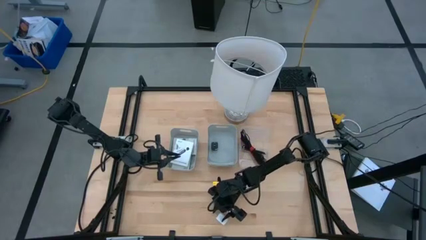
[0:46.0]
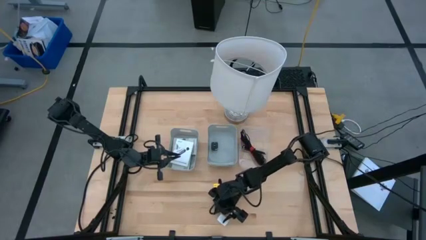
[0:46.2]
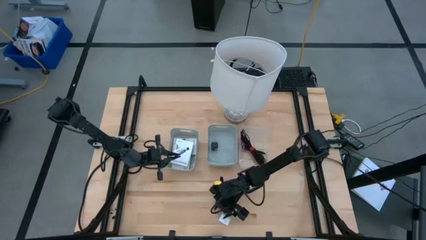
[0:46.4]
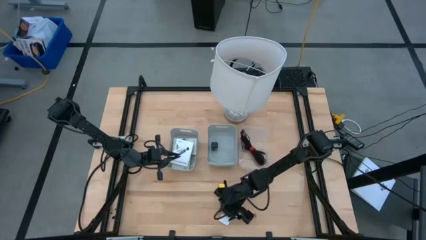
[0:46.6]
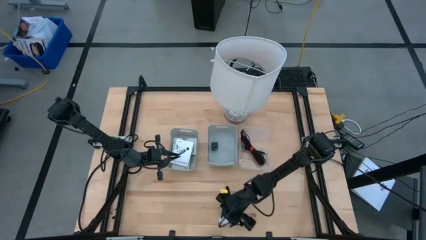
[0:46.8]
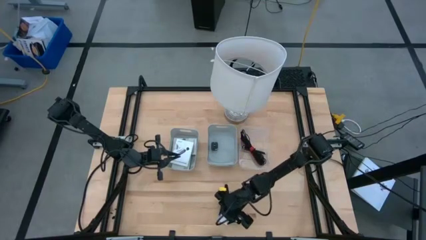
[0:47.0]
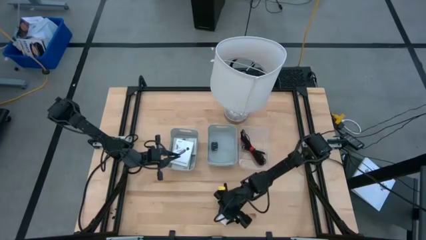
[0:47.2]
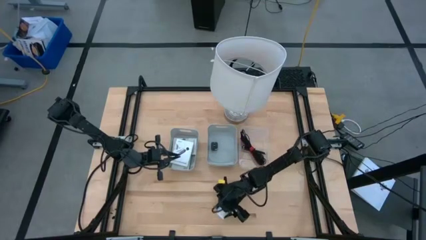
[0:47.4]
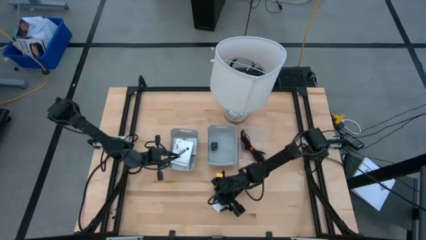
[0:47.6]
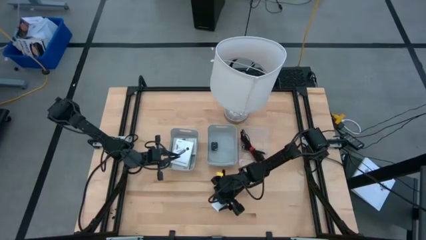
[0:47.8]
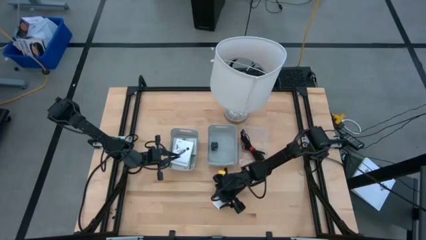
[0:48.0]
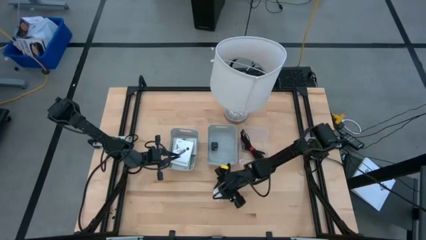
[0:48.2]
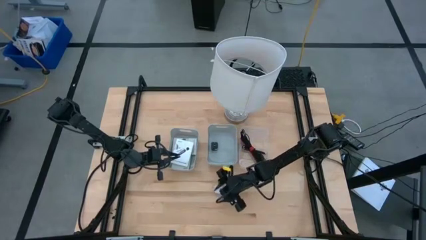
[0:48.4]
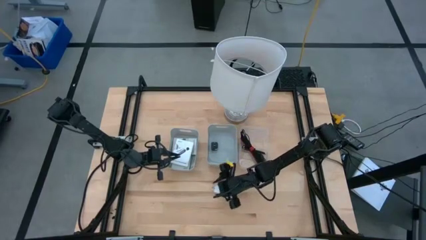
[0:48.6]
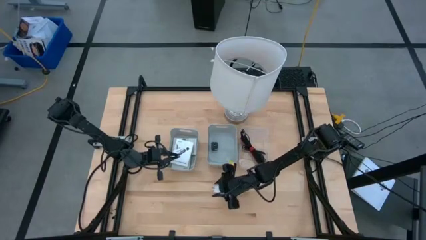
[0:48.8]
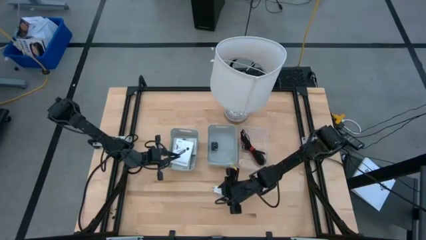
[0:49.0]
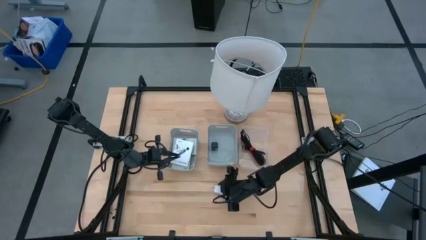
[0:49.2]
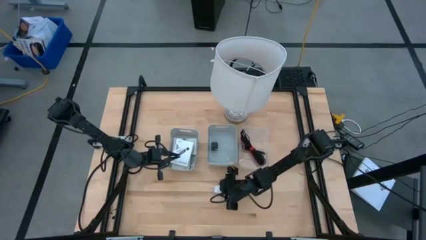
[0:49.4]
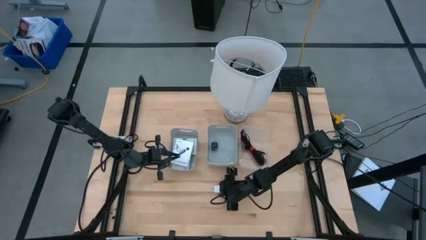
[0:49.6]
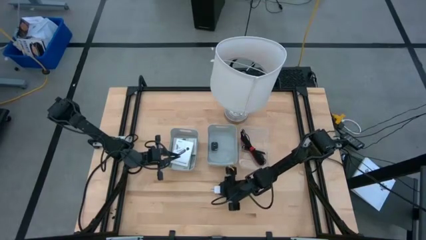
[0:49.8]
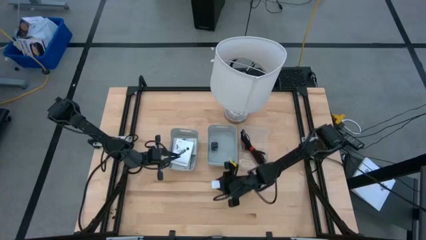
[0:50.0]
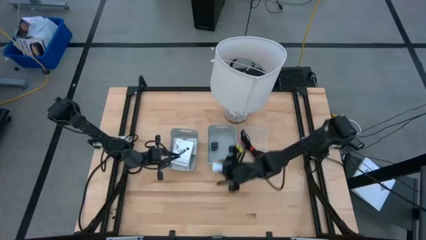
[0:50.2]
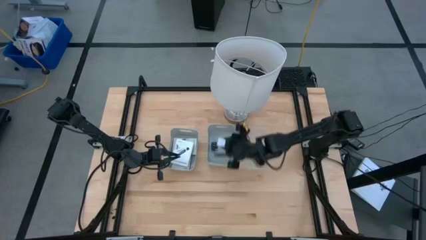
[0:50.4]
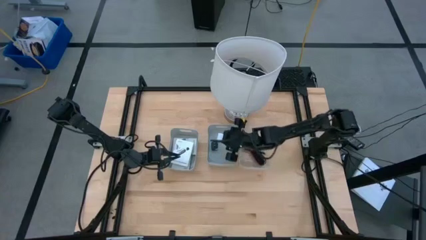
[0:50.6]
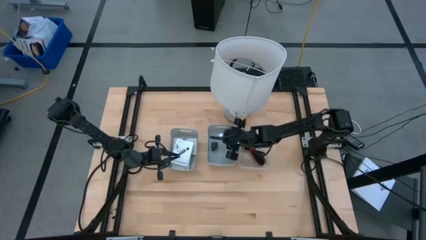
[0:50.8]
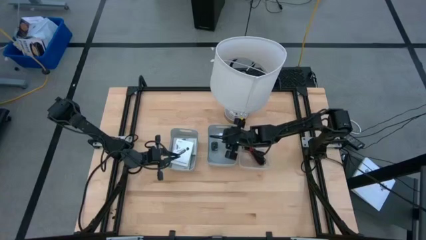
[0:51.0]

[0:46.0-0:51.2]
Task: Pick and place items into bin
Put the white charger adapter into the right gray bin

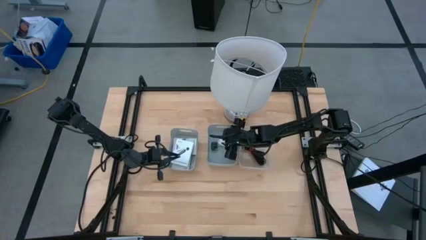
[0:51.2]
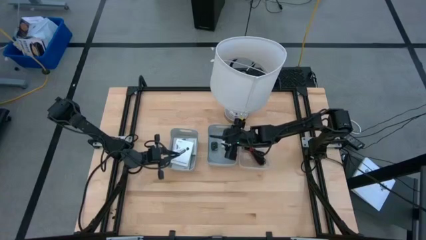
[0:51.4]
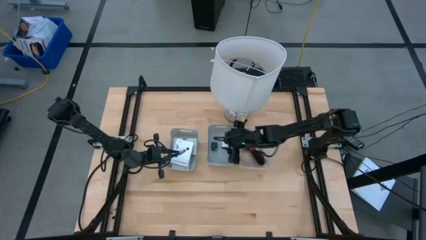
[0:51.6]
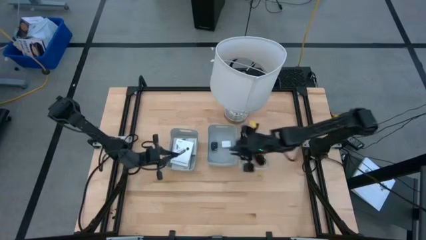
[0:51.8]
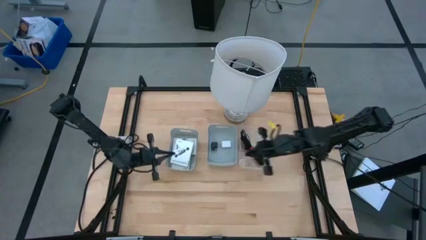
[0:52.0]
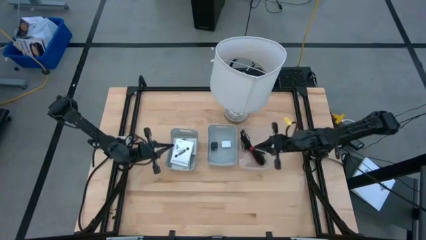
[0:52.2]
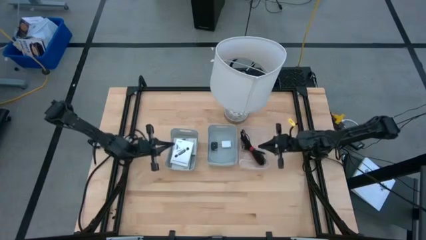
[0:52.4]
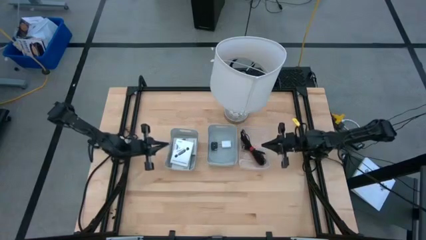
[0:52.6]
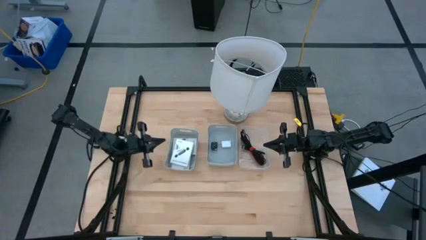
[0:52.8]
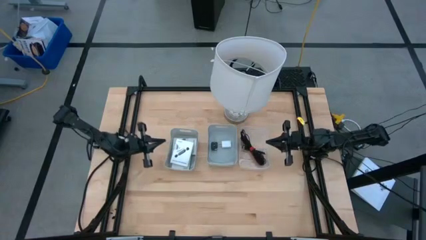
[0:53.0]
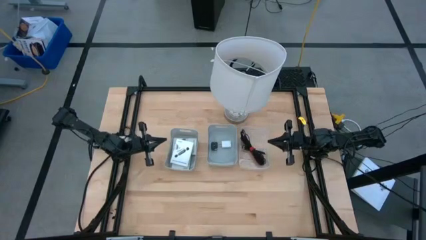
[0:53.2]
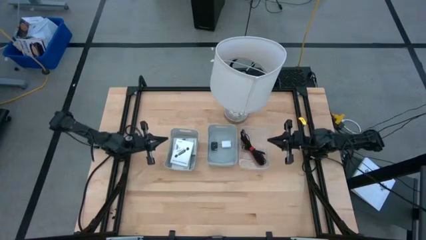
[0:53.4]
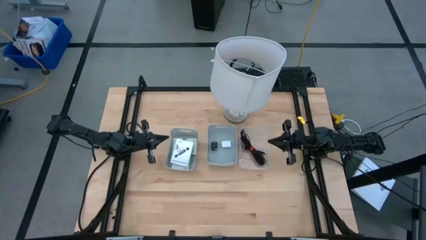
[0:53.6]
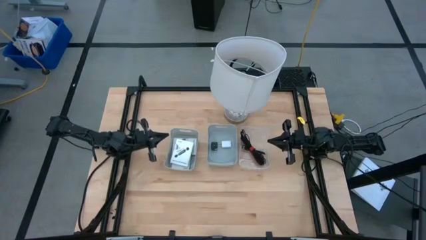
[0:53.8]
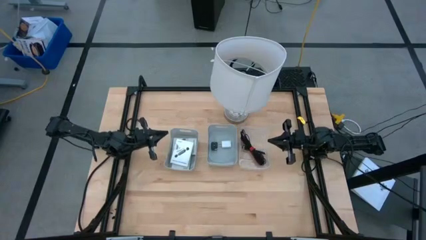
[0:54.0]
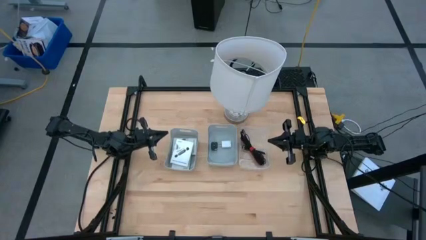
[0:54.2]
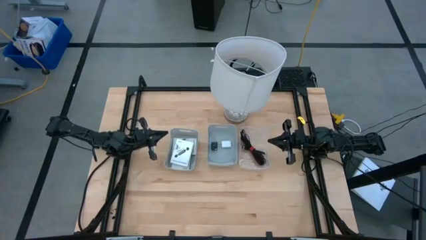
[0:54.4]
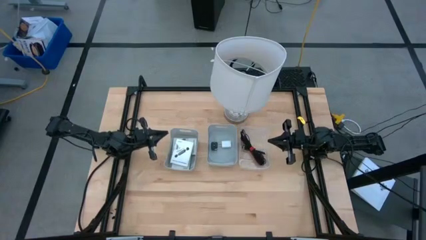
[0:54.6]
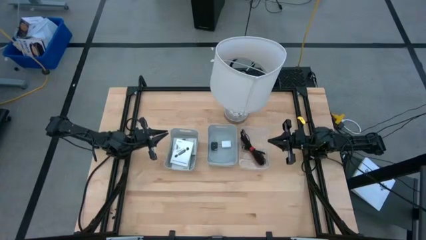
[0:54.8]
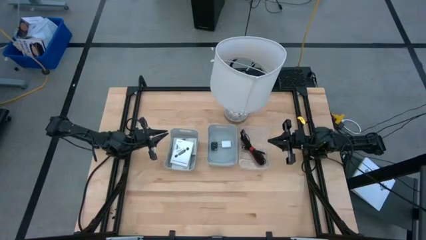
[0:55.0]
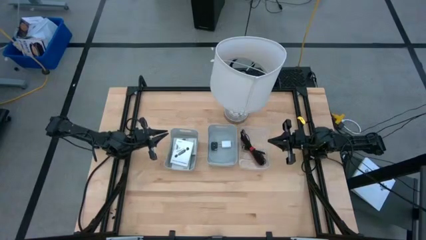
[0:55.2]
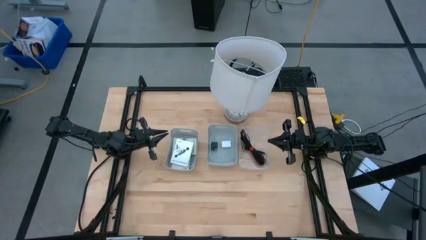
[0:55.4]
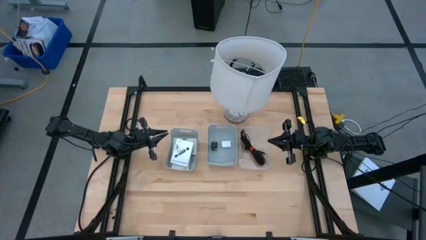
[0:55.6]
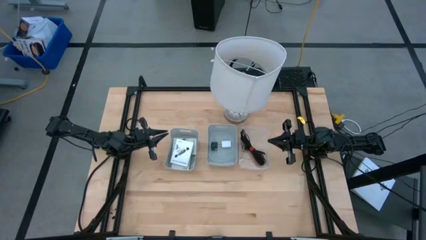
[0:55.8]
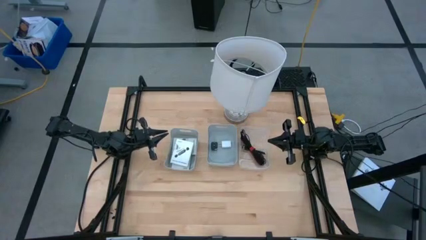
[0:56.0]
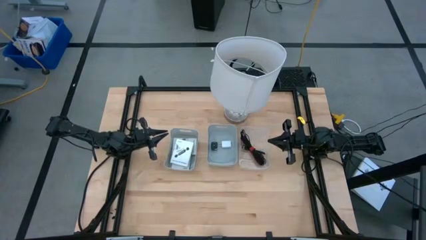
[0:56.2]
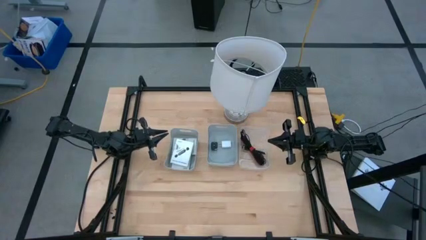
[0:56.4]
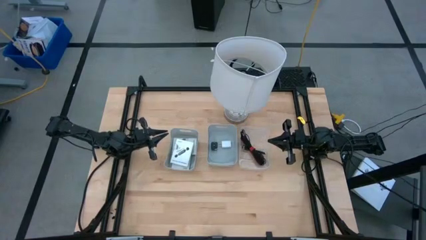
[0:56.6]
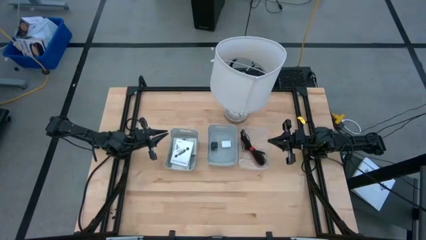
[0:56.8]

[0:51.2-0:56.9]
Return to Home Position

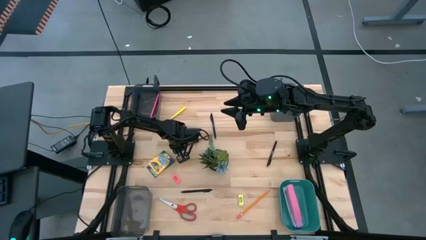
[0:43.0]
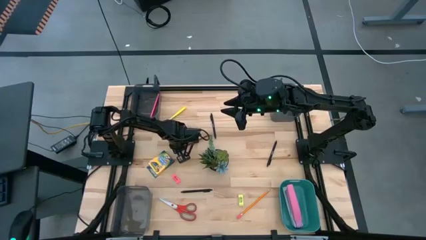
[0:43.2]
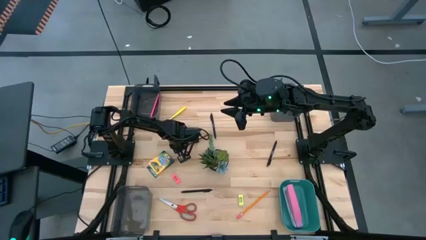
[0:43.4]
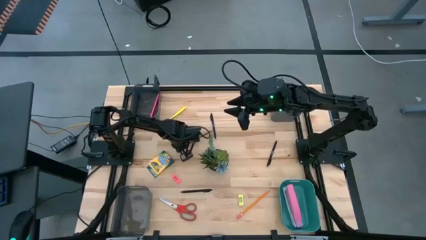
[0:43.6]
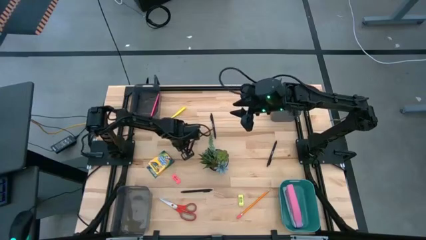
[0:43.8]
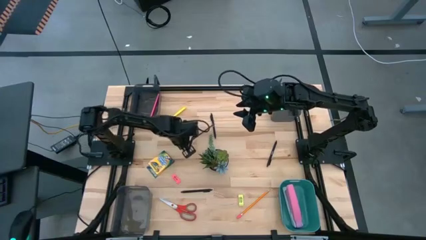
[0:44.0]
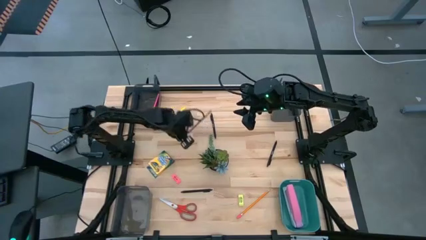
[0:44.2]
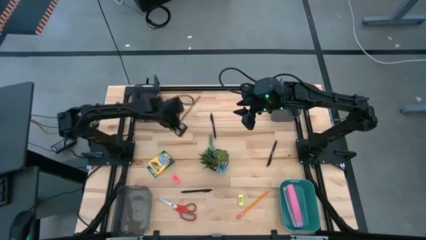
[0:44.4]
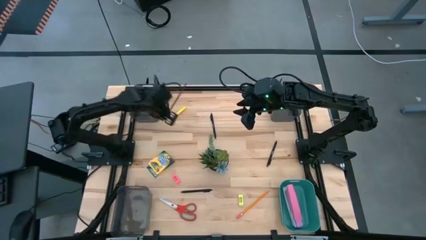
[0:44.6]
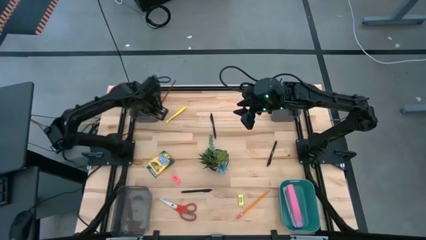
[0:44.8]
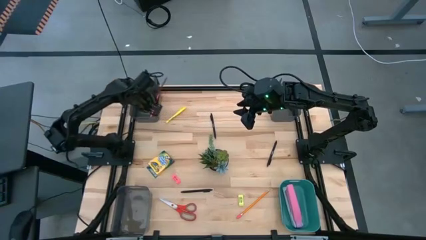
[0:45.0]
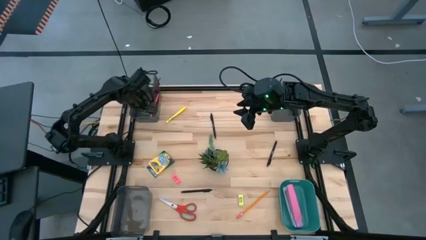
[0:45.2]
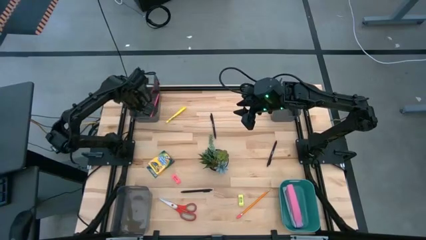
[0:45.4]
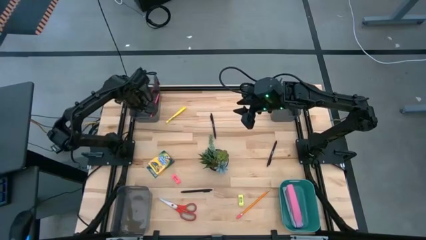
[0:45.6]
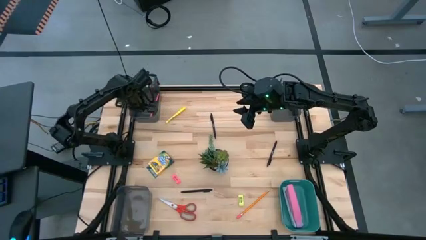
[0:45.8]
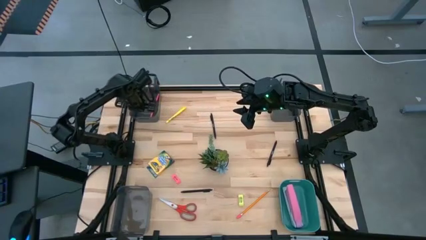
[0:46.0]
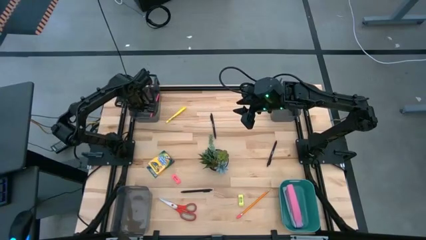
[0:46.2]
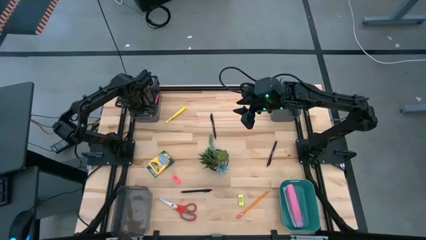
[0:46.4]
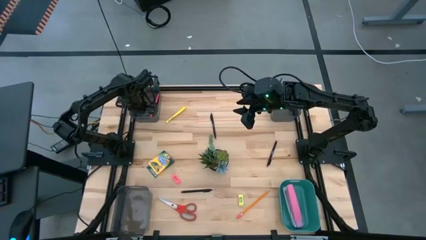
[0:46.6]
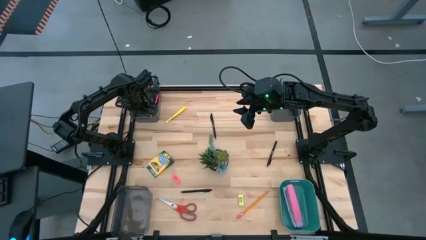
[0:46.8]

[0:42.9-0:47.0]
Task: Sort crayons/erasers/pens/pencils in bins
Put the brown pencil into the top left black bin
